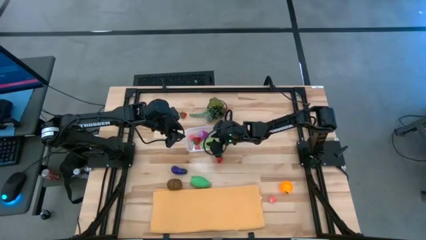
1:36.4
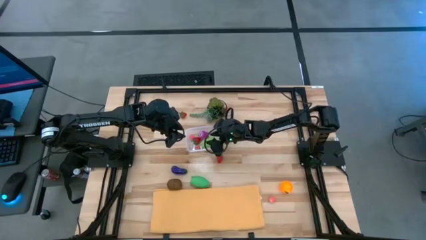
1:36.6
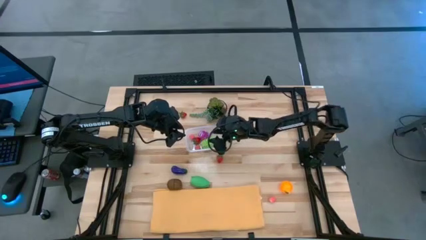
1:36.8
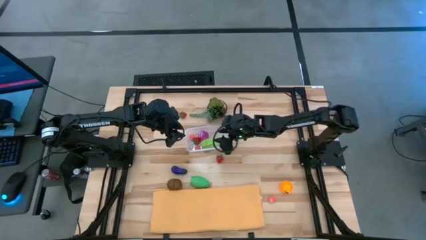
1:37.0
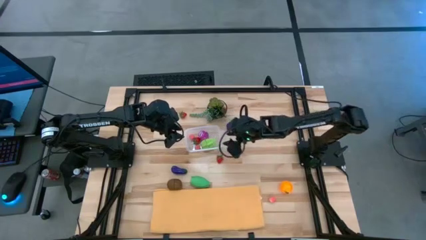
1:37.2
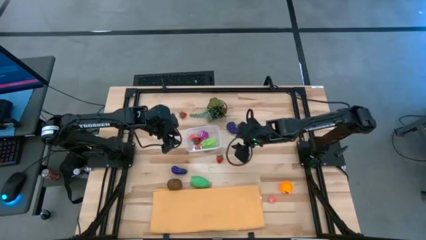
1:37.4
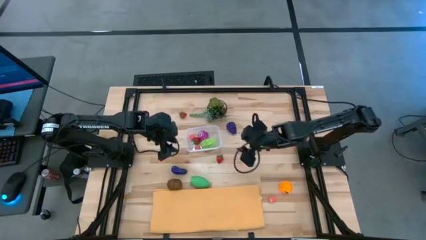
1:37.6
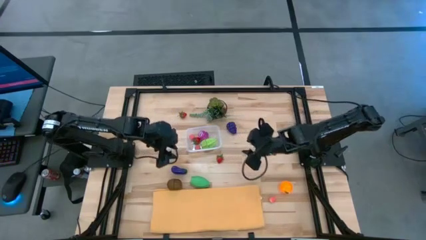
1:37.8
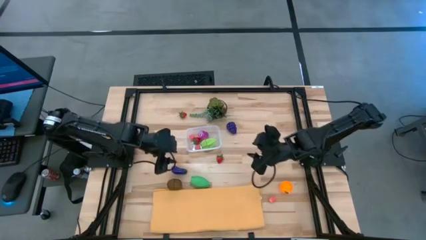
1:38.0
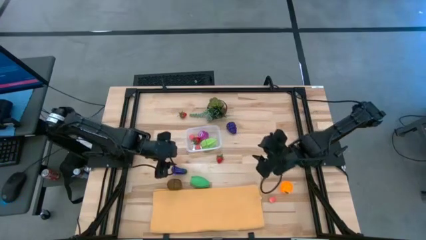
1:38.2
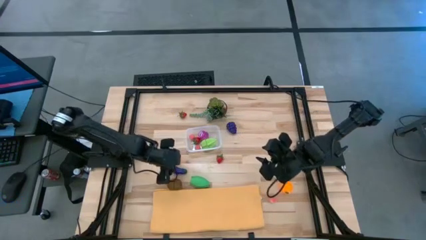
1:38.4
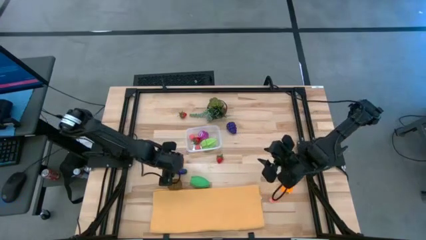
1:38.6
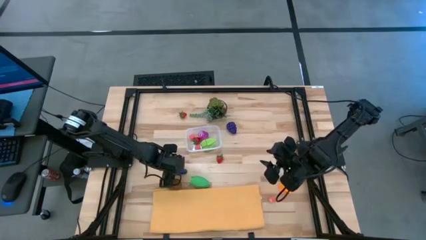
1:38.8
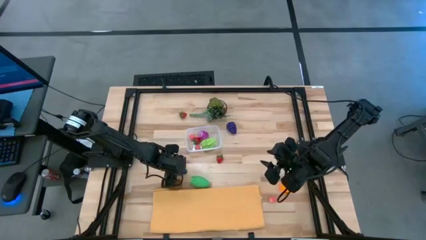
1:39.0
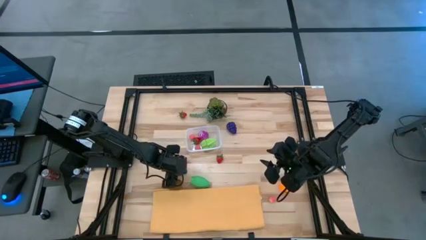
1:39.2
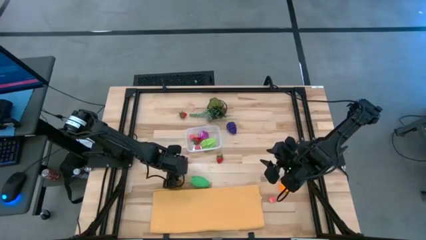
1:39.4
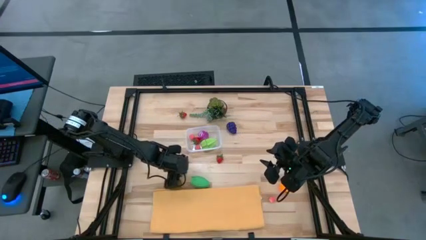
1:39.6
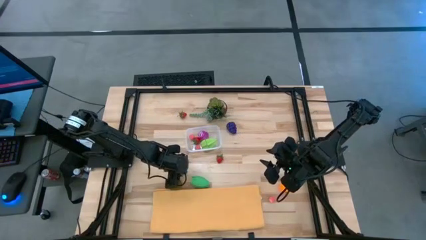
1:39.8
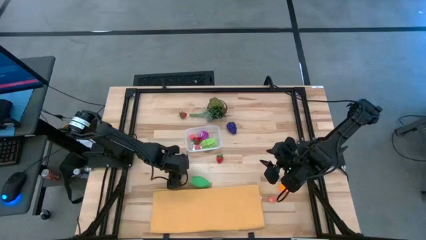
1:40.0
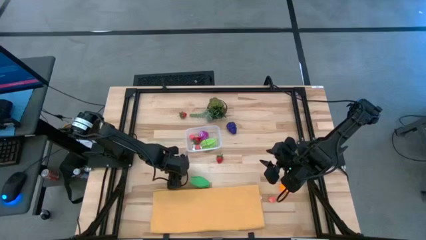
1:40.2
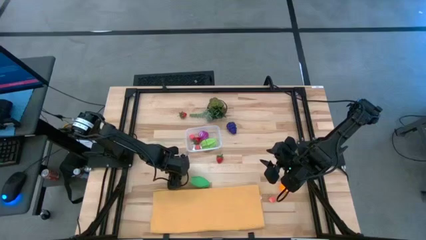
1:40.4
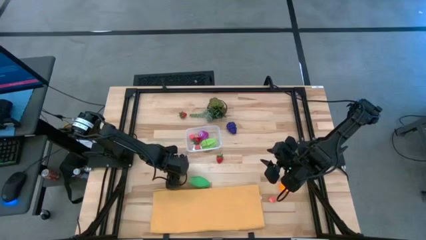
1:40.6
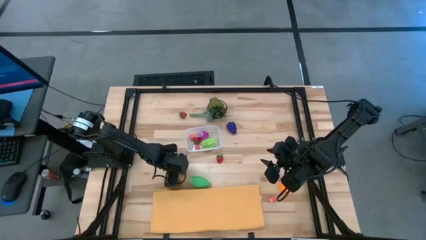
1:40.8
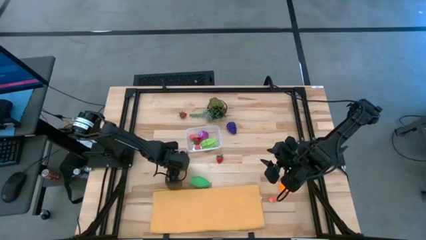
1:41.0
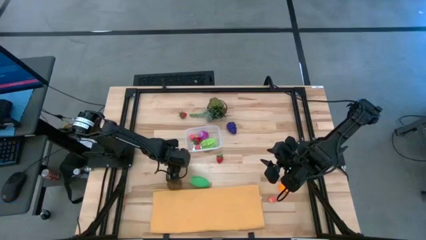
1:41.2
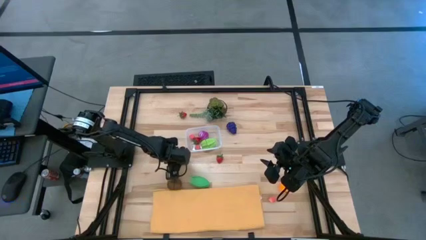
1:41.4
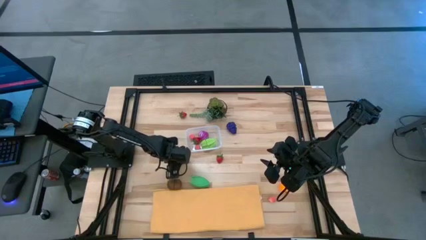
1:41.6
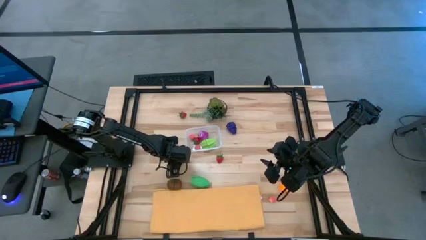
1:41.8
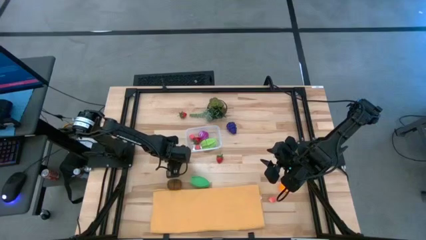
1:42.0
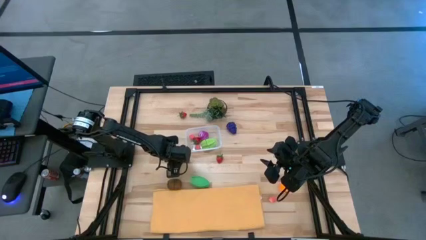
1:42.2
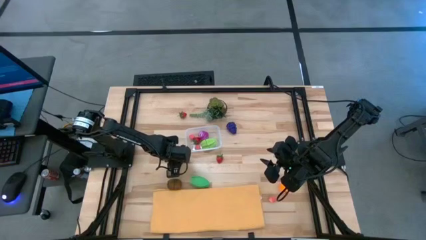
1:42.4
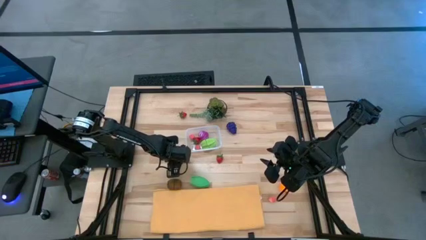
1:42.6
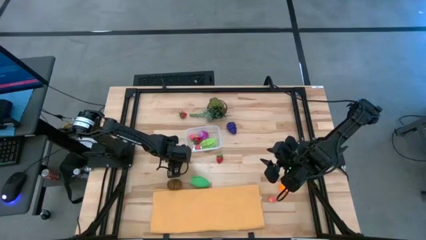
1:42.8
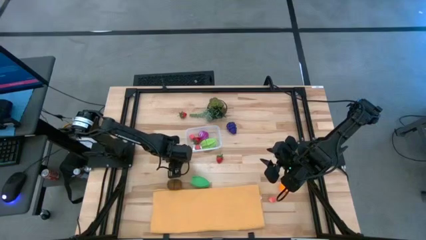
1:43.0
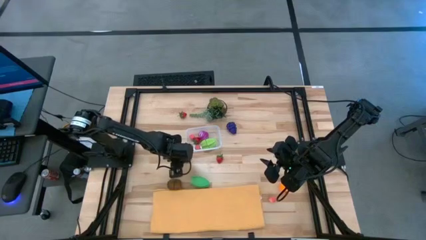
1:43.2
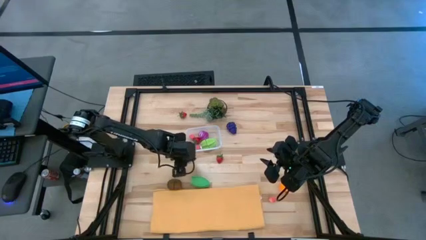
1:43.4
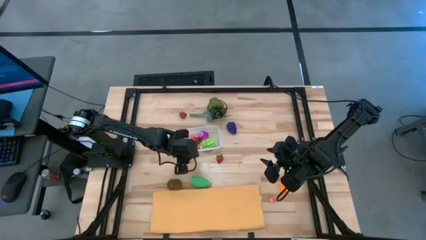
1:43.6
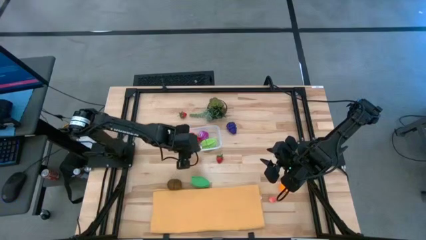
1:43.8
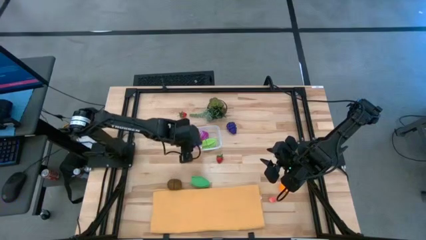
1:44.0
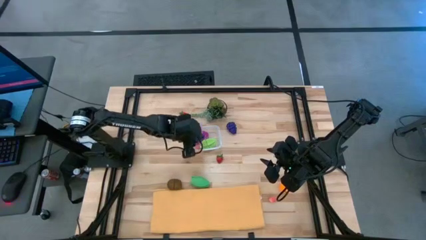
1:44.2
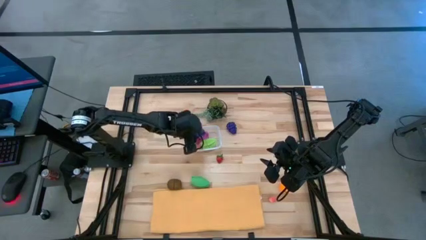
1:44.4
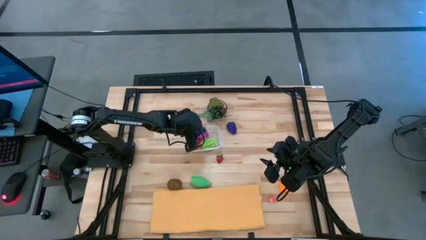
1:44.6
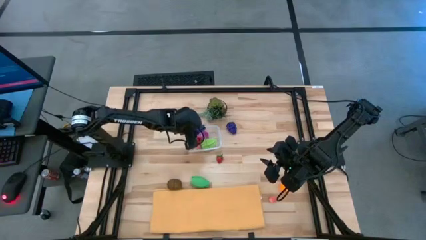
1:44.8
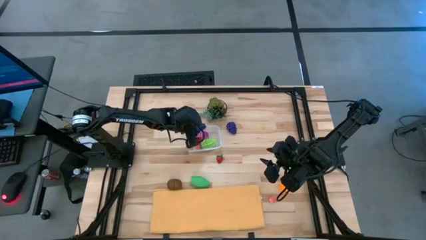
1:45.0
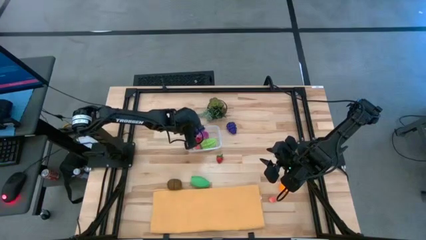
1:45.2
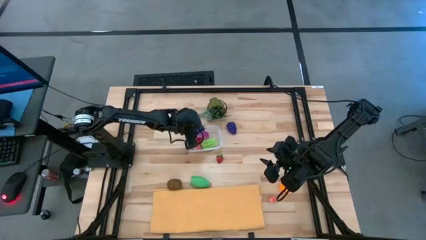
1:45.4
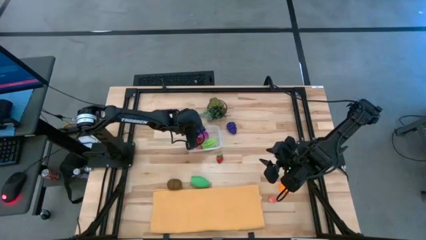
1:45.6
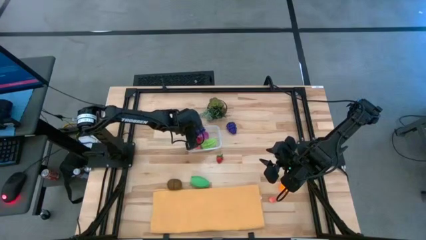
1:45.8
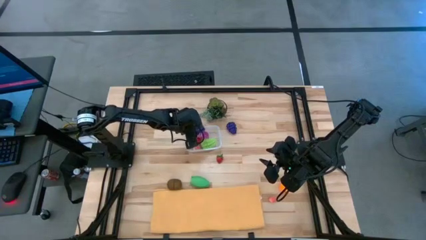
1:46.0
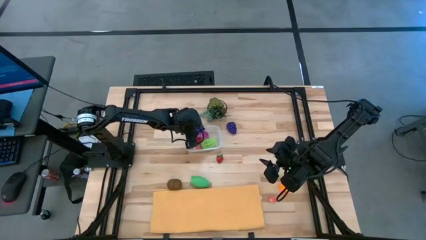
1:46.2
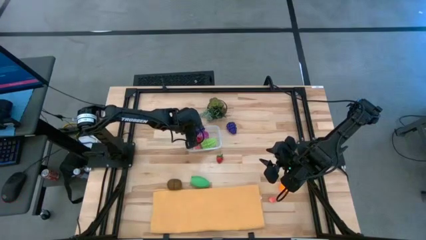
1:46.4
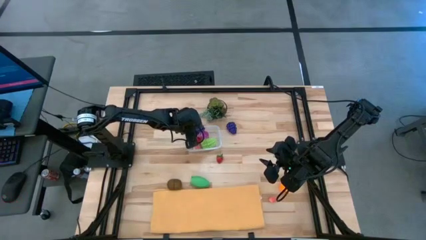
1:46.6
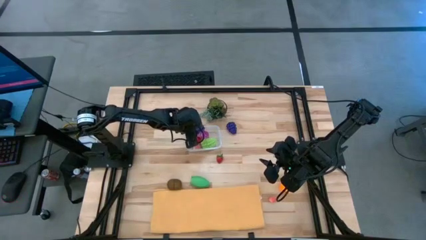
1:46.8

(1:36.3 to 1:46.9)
Task: Pick and placing Produce into tupperware
Put the purple eggplant into the transparent bin

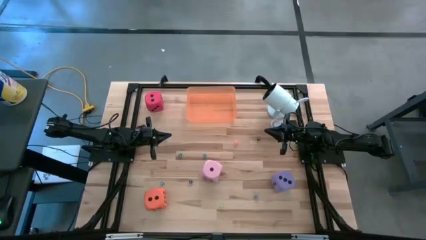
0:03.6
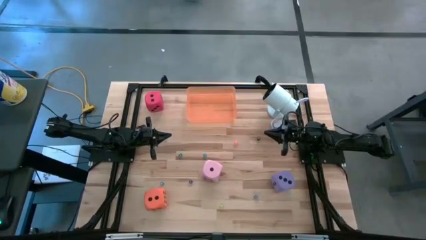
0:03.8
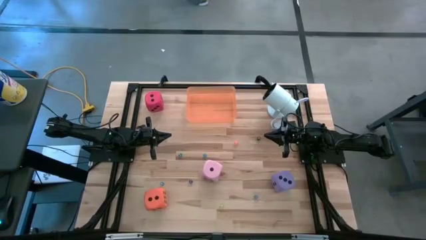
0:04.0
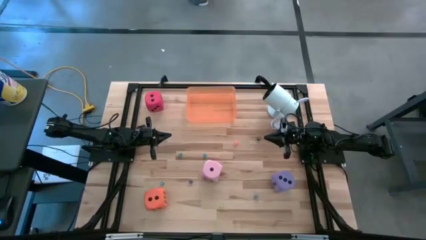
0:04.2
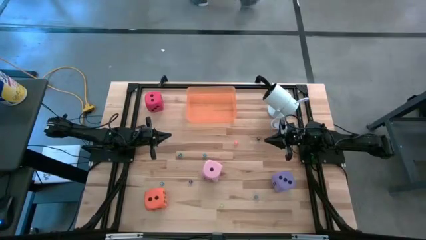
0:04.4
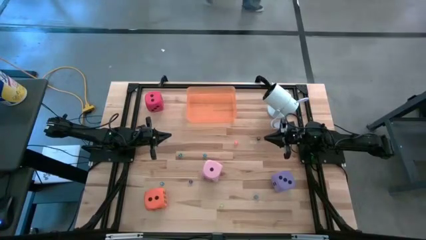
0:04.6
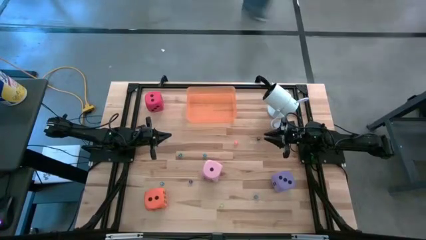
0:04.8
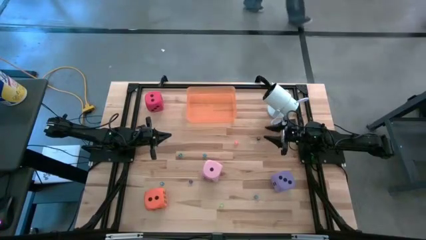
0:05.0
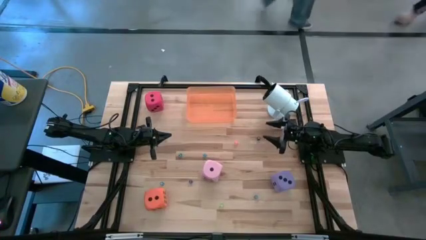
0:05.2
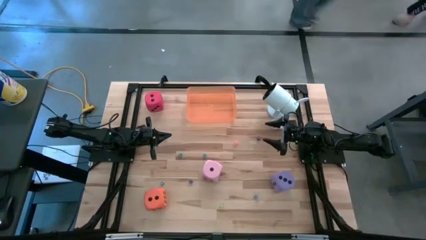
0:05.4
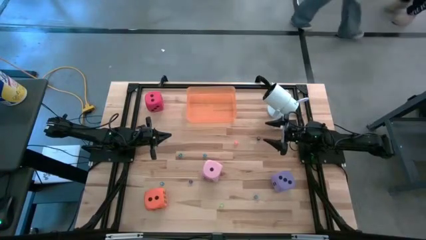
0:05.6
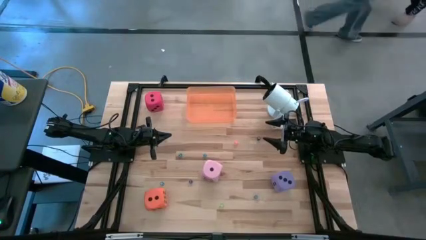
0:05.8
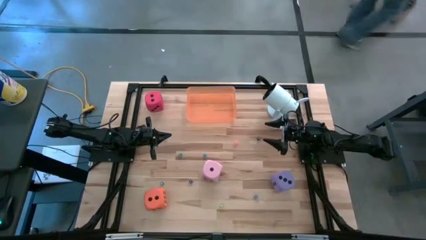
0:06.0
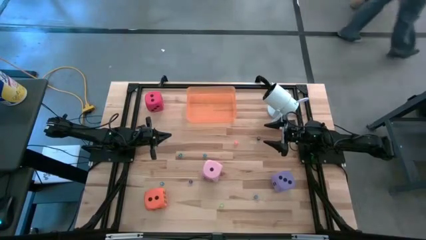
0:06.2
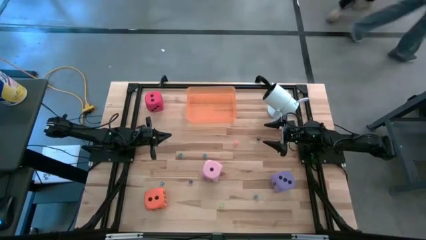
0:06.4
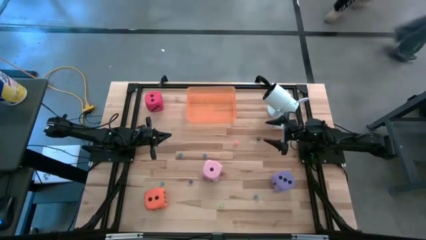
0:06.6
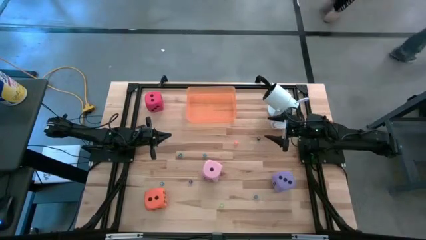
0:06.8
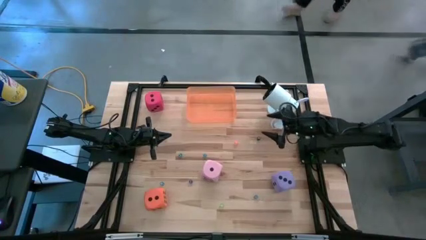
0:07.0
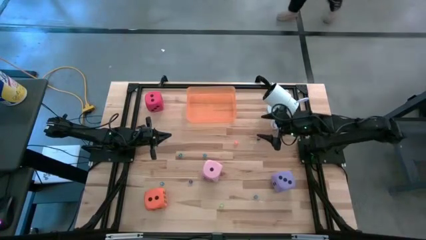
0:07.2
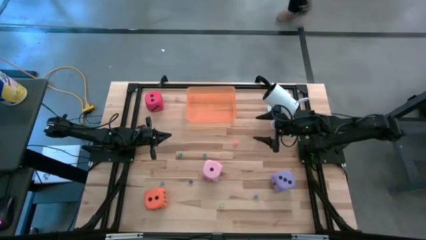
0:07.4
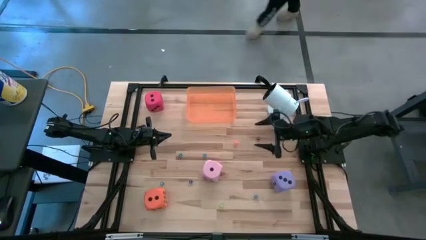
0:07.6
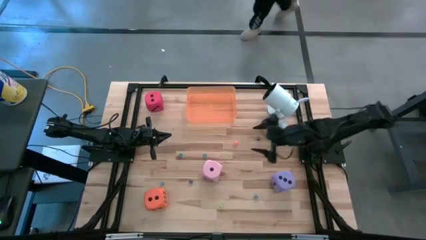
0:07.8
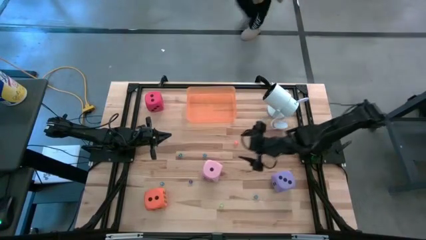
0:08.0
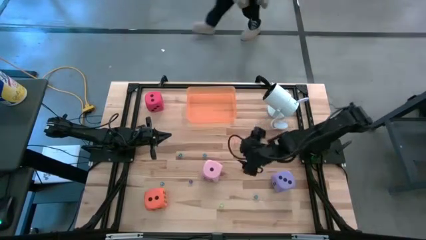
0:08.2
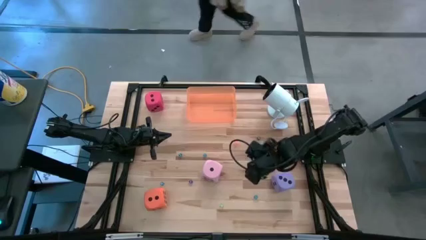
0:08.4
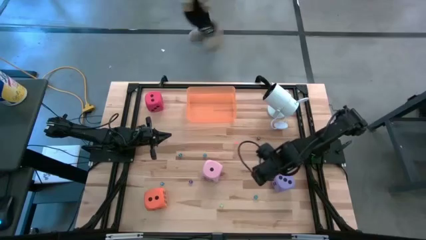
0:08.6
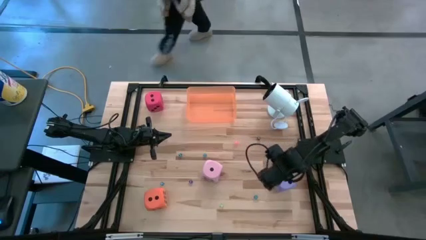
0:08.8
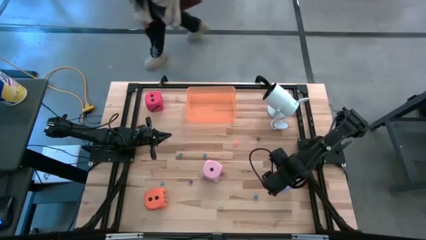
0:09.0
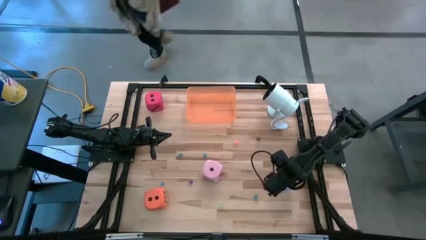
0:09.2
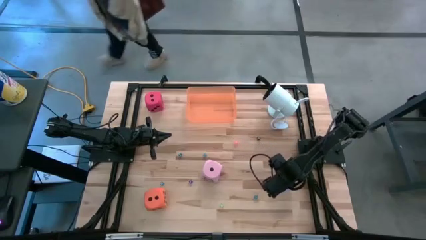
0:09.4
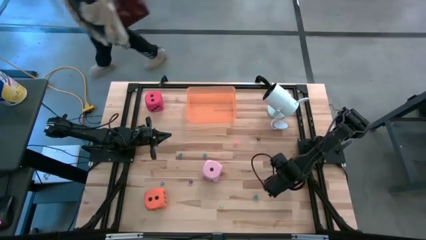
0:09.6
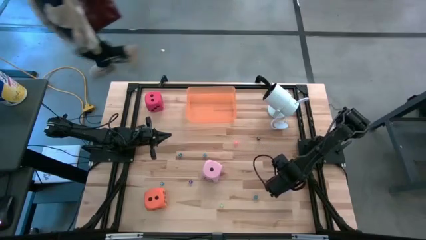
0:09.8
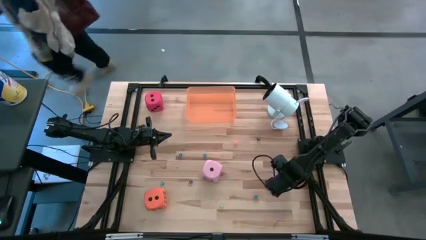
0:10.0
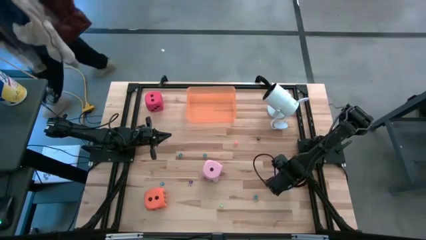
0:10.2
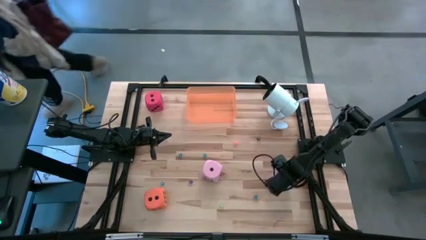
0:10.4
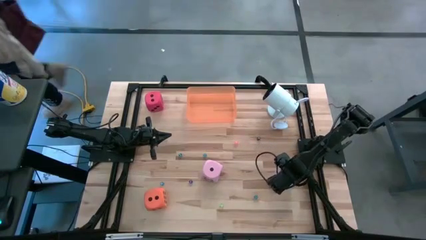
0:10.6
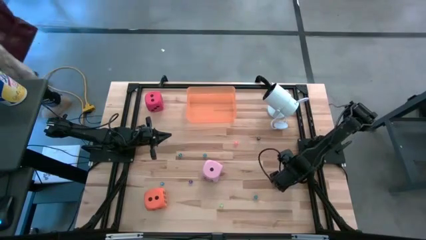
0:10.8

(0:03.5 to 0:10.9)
Task: Pick & Place Dice
Put the large purple die into the orange bin
